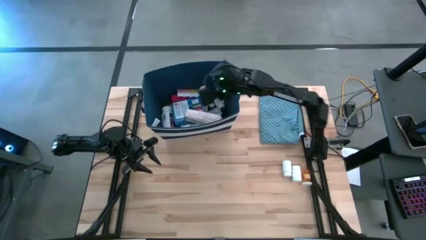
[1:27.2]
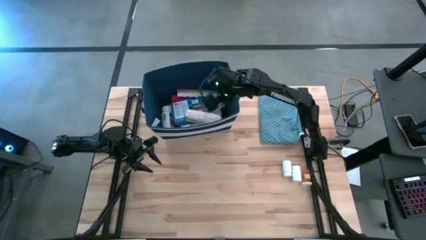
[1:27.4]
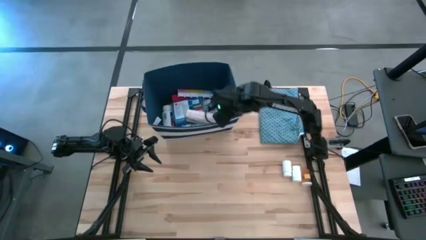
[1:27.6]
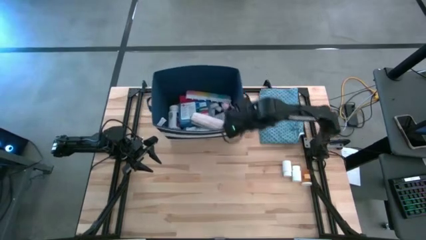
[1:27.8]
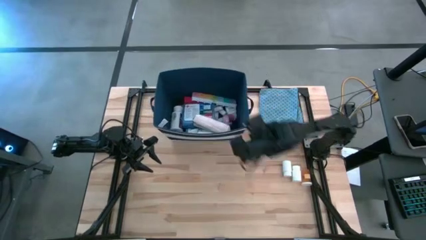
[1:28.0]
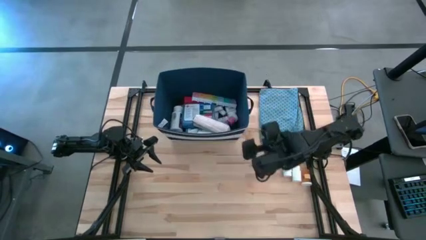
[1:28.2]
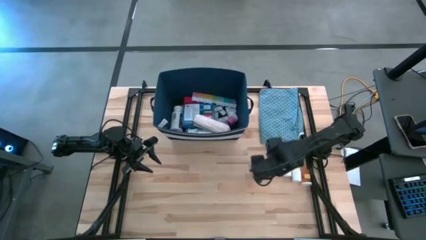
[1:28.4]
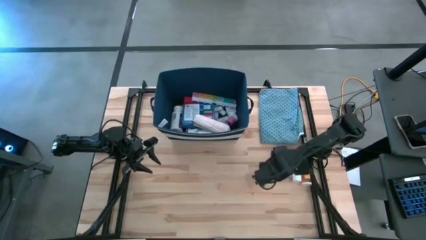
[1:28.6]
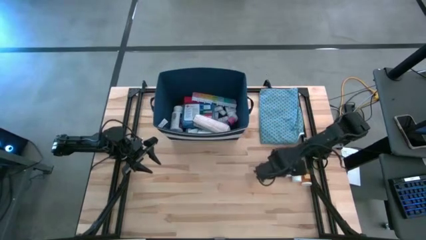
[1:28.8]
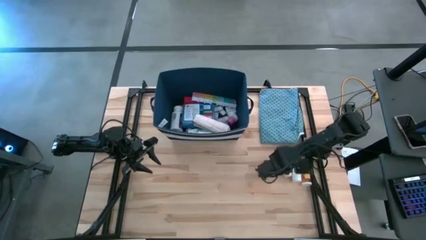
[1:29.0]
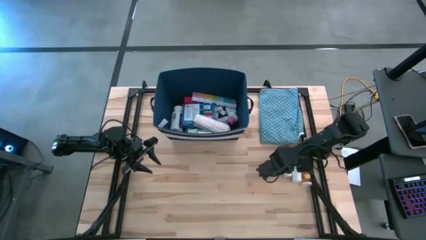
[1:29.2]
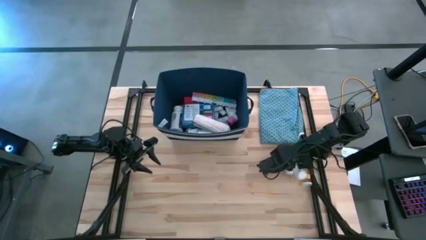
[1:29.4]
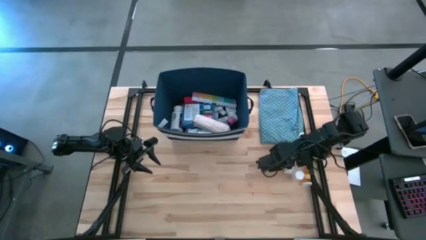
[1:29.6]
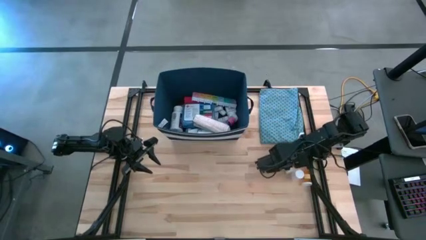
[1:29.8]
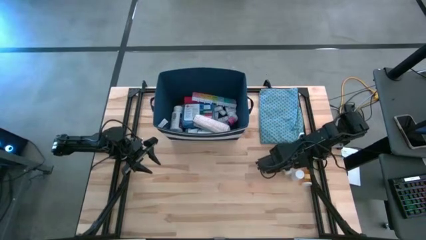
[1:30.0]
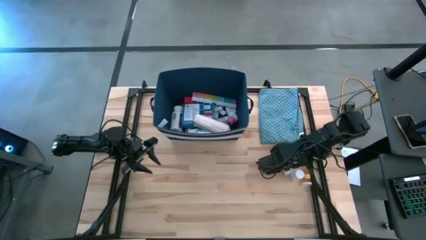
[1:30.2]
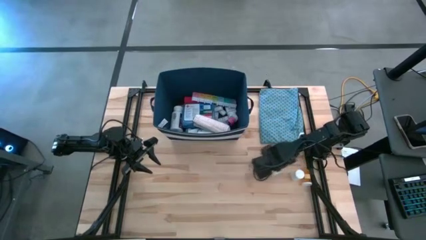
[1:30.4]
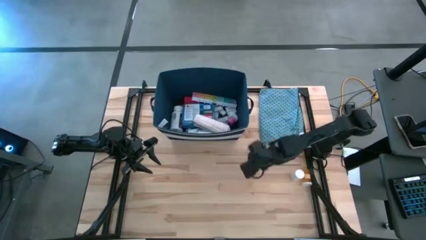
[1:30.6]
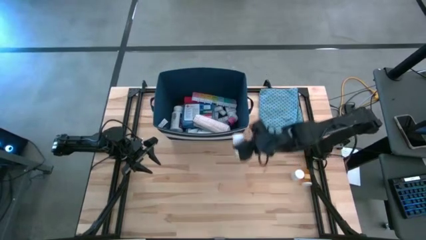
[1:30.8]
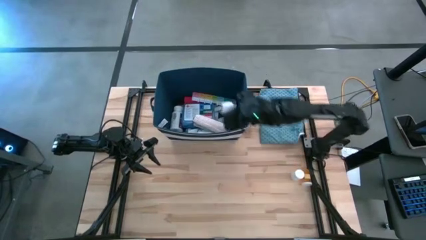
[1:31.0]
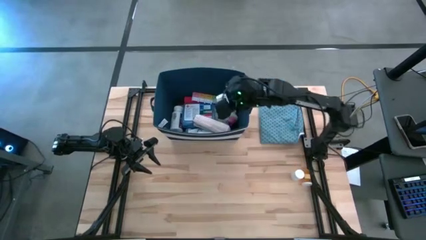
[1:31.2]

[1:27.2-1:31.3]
Task: Pick & place medical supplies in basket/bin
Put the left white medicine bottle into the blue bin

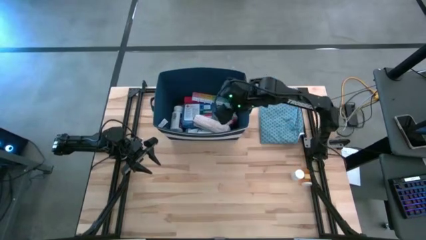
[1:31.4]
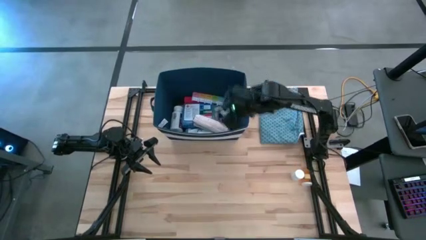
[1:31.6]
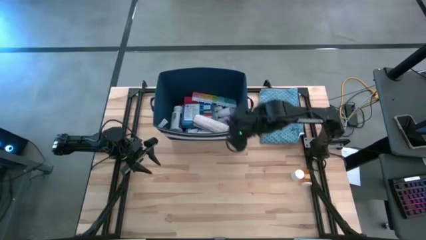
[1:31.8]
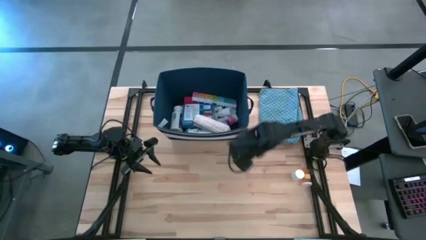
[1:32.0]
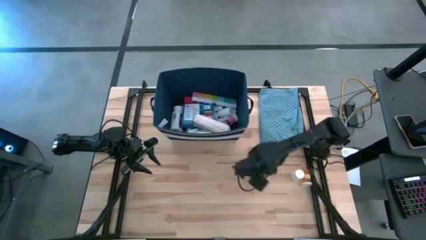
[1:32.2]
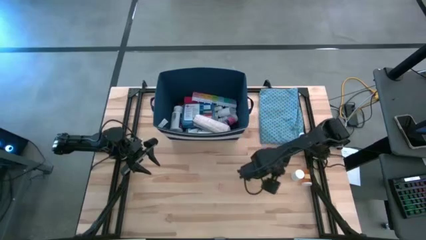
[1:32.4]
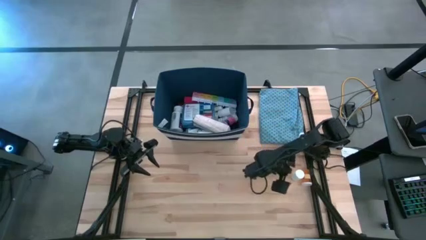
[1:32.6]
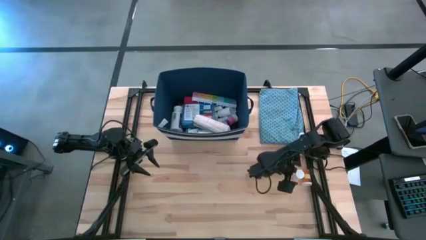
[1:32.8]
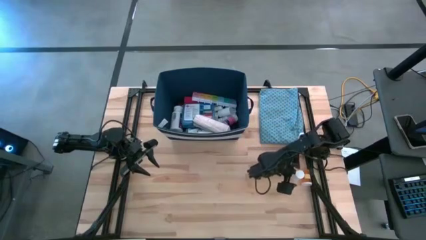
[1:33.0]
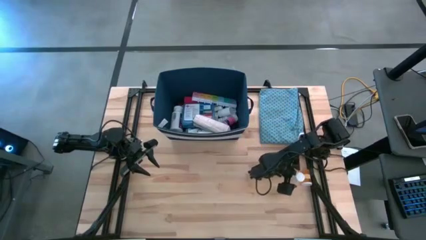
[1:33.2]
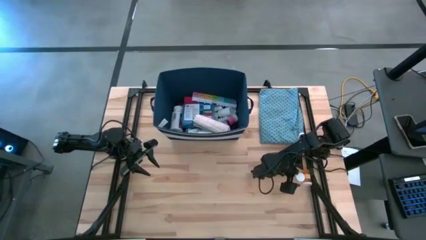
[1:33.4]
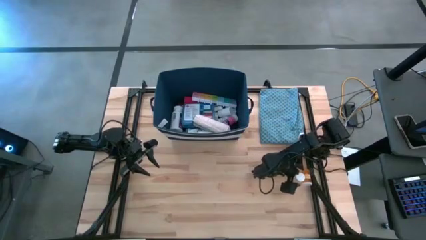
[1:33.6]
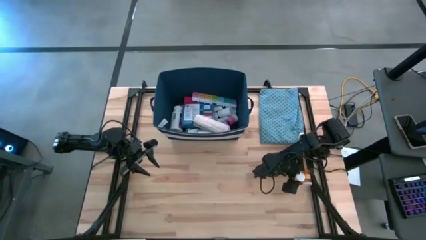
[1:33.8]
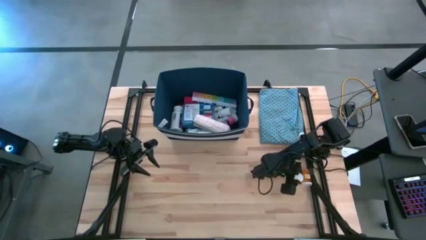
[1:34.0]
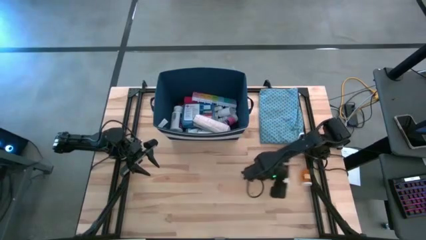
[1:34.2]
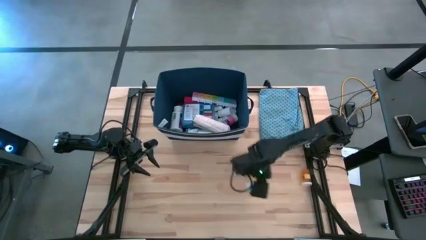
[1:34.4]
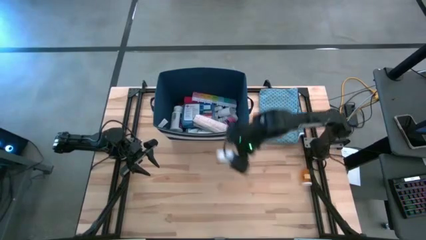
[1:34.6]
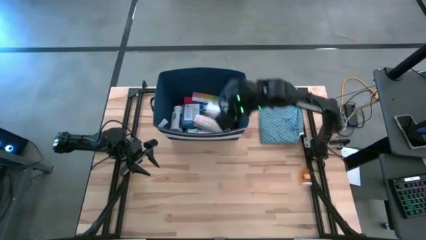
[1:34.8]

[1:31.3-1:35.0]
Put the white medicine bottle into the blue bin

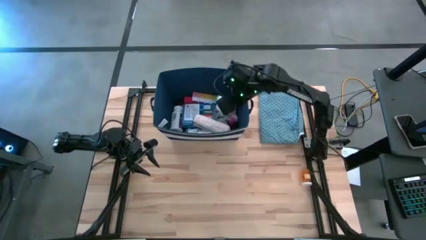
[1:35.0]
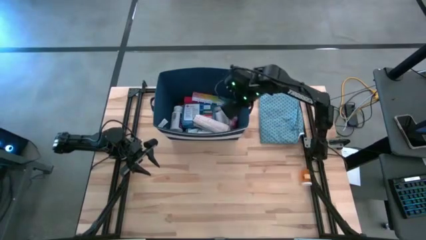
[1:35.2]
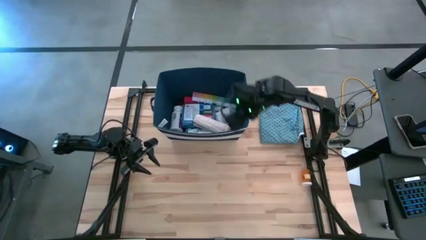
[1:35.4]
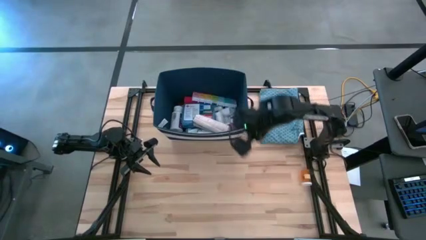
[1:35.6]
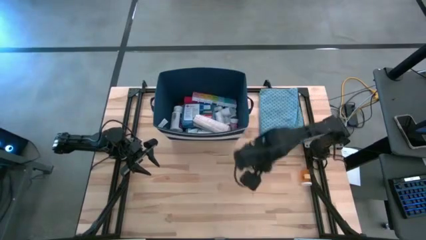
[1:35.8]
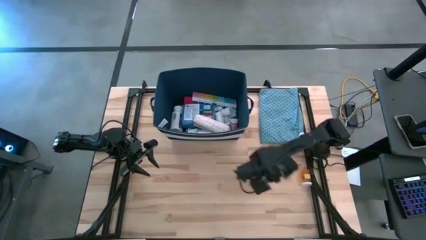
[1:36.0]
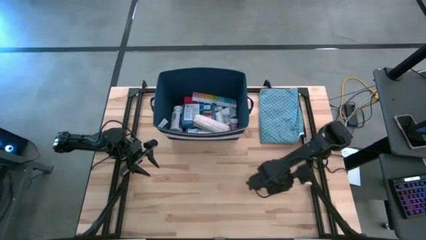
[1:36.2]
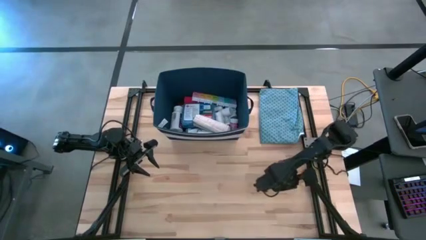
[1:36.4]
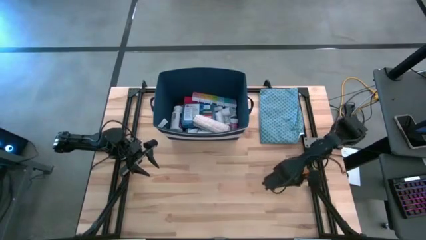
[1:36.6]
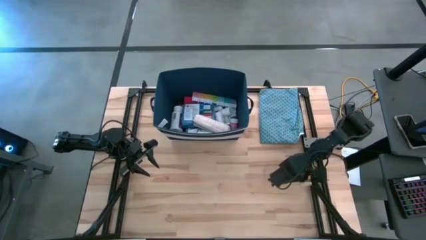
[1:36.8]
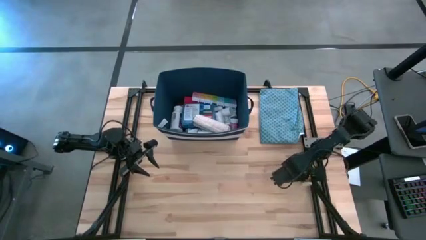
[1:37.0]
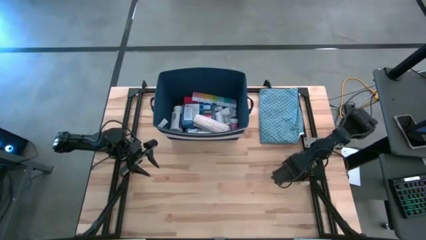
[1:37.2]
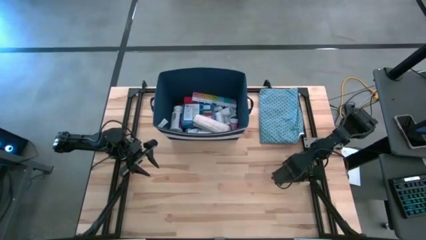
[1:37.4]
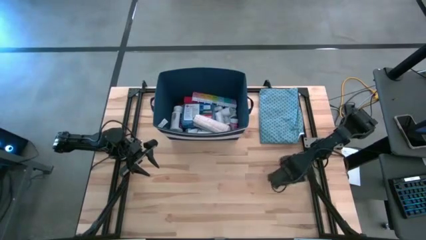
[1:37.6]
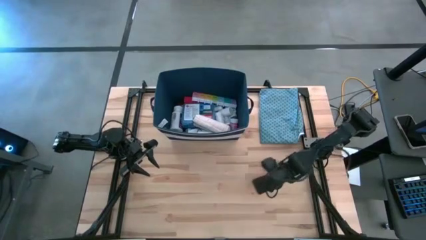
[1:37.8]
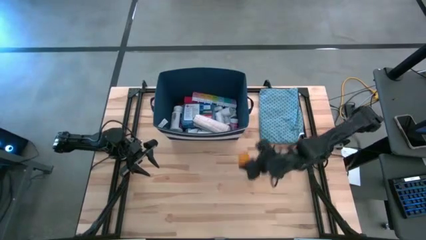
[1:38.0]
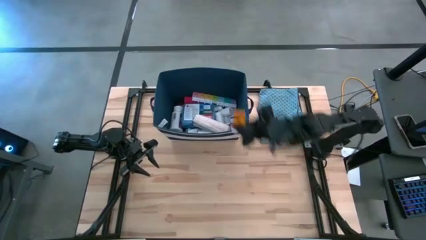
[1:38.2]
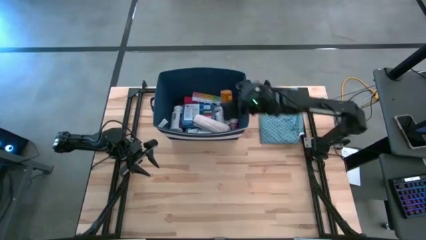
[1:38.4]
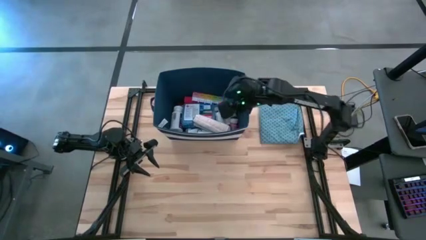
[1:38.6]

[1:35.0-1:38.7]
Put the orange medicine bottle into the blue bin

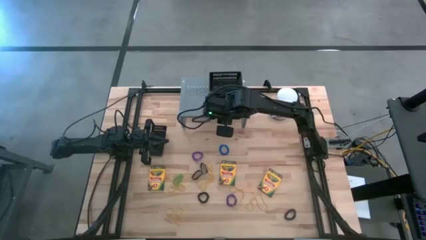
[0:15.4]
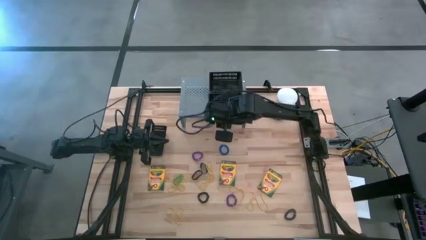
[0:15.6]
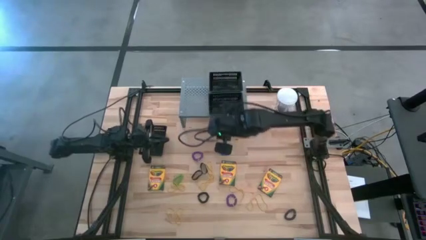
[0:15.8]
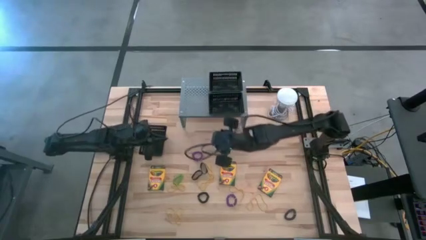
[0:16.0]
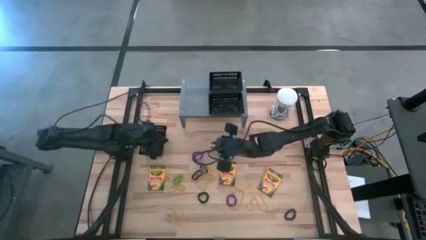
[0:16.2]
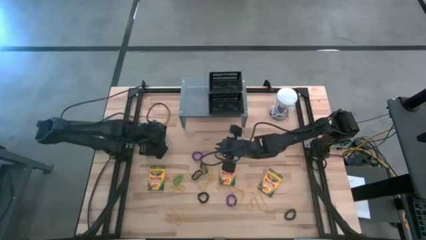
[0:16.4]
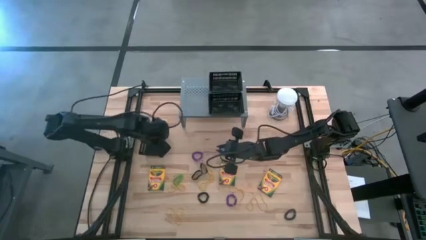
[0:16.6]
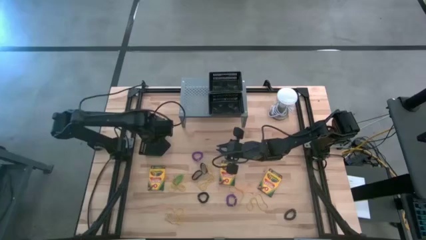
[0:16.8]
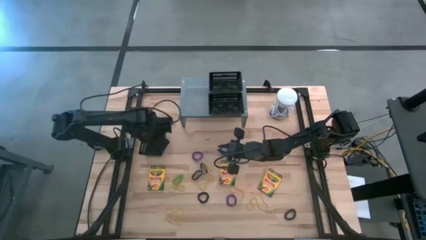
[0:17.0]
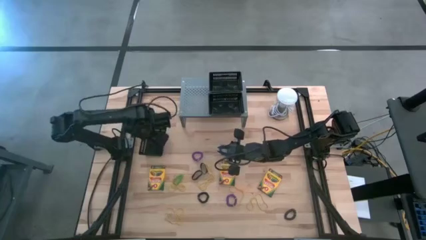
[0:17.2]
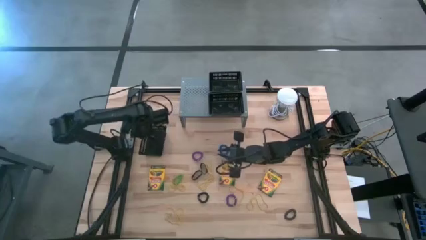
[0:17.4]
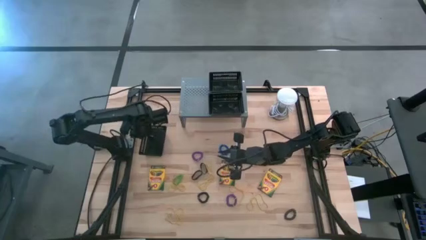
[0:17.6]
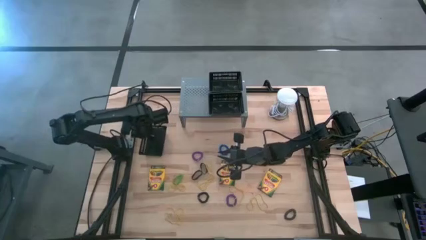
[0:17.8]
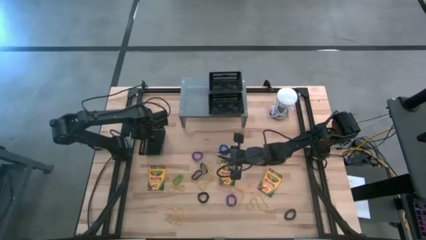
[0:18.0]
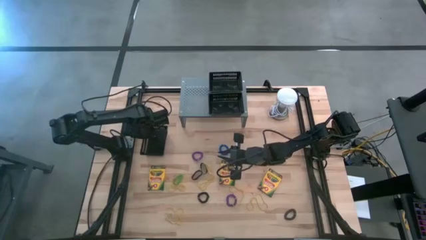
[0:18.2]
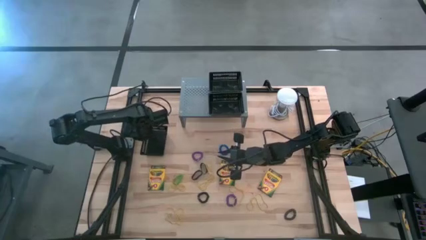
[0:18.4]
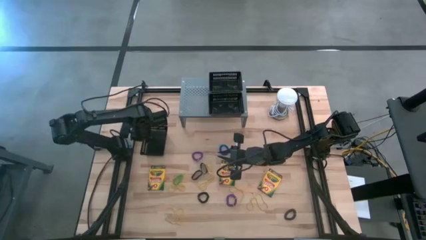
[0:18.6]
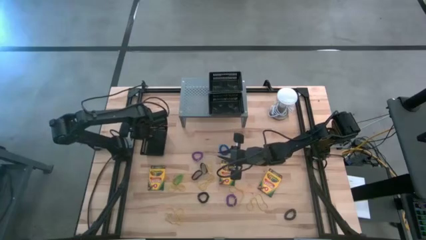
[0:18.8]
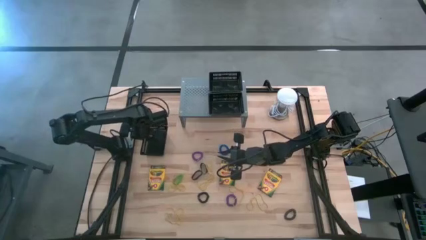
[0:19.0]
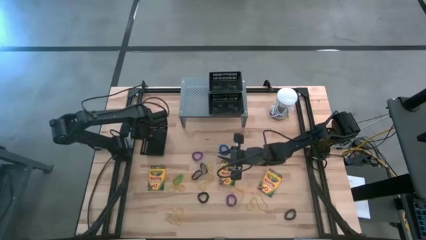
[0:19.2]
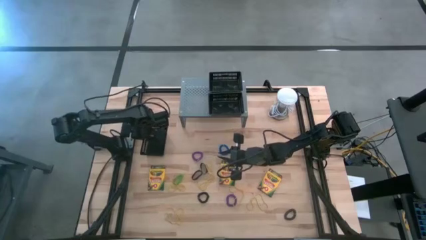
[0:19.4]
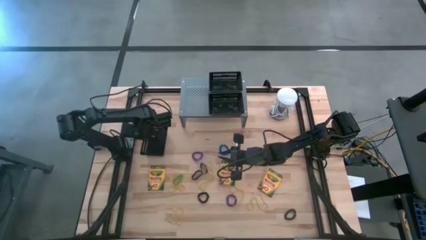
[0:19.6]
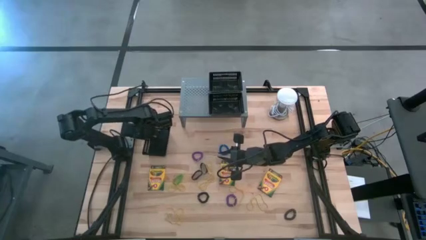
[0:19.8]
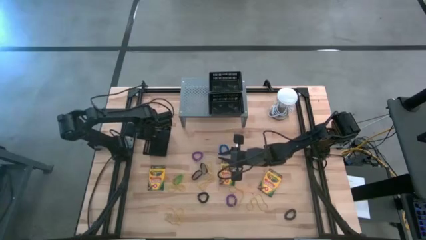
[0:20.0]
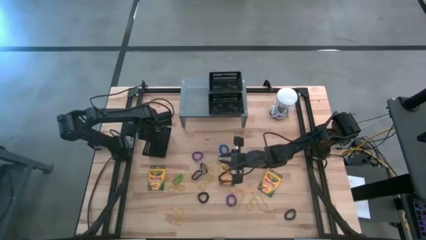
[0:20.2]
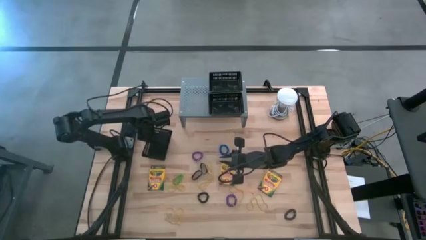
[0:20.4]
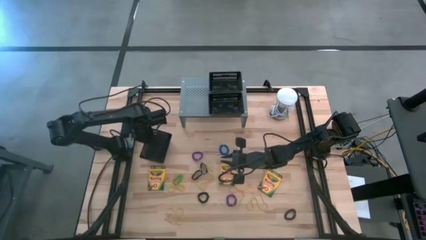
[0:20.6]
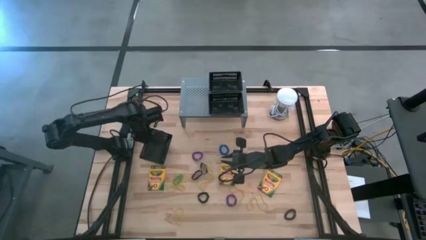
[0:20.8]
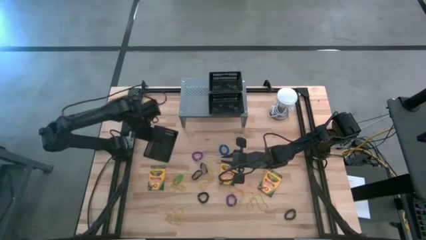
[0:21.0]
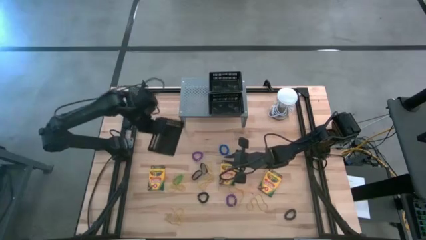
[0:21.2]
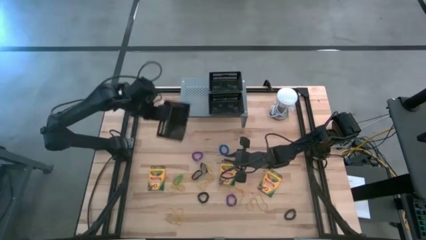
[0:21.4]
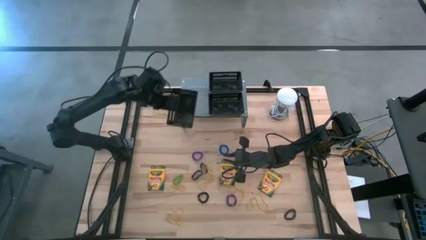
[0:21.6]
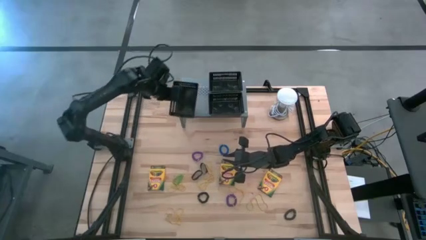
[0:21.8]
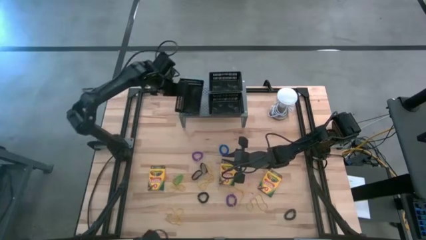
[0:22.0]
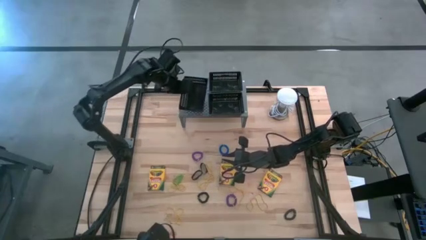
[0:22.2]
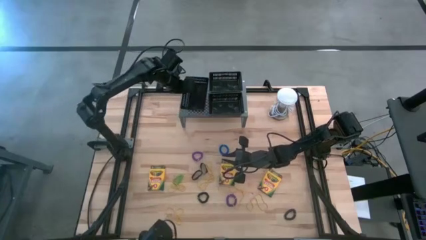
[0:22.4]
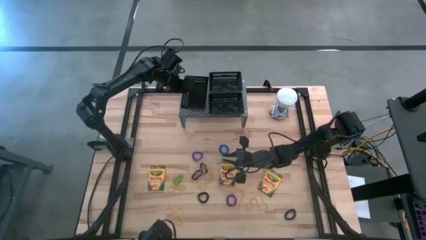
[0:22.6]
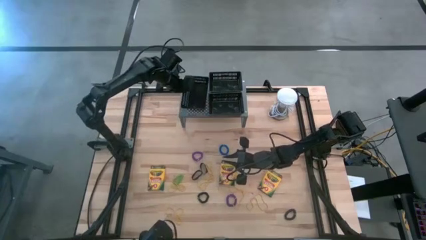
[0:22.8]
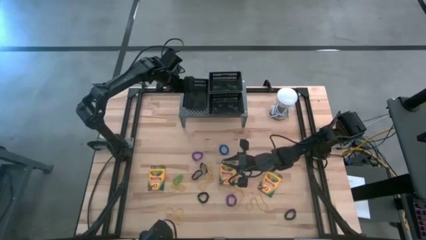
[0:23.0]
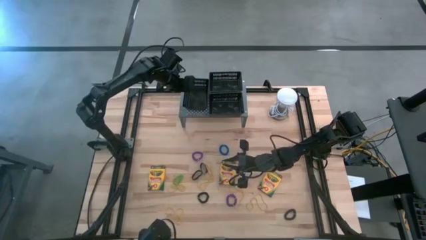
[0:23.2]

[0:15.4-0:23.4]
Task: Pick & Place Office Desk Supplies
Put the black bin on the shelf
